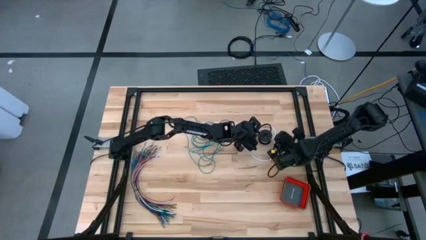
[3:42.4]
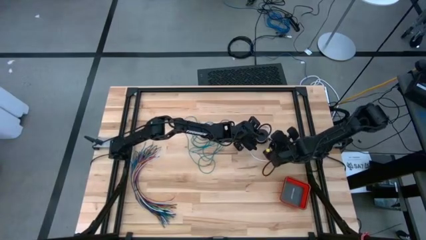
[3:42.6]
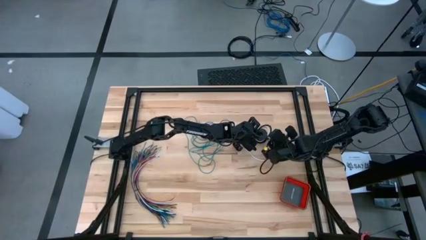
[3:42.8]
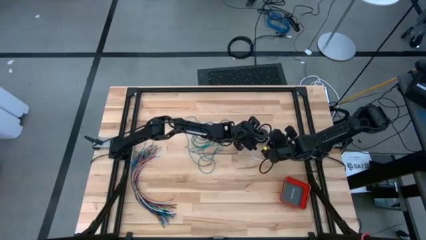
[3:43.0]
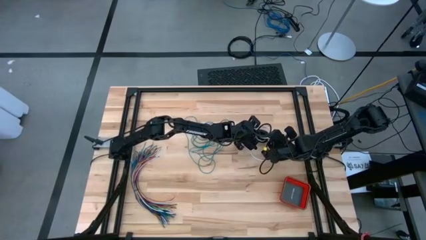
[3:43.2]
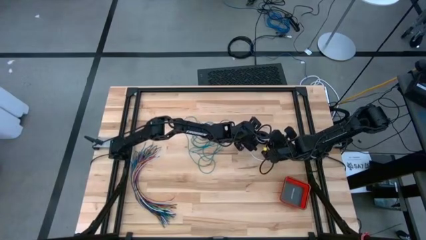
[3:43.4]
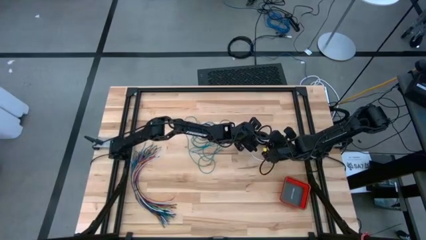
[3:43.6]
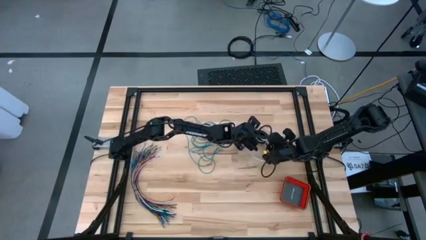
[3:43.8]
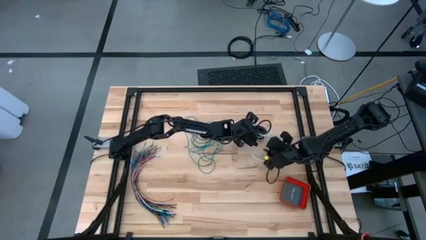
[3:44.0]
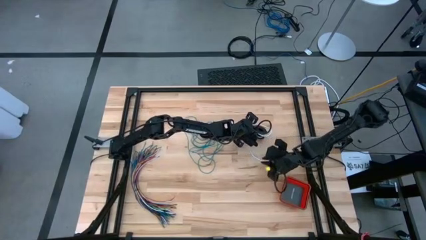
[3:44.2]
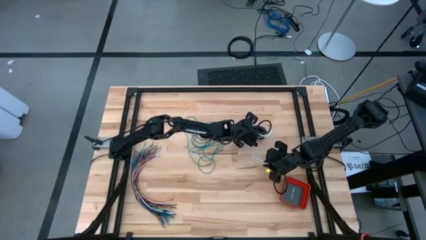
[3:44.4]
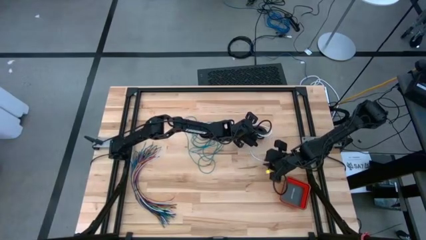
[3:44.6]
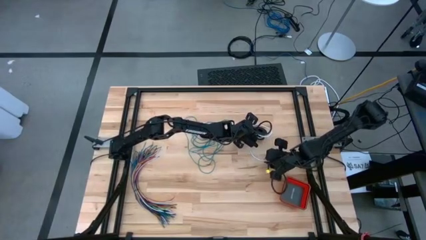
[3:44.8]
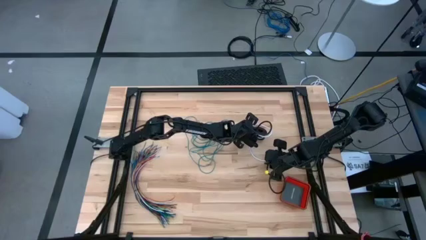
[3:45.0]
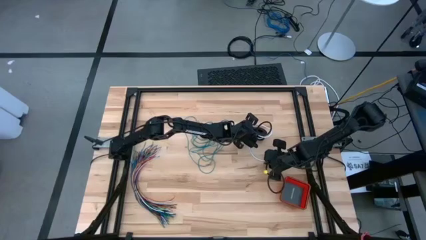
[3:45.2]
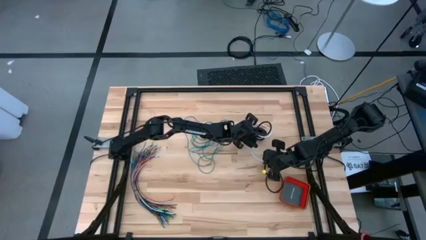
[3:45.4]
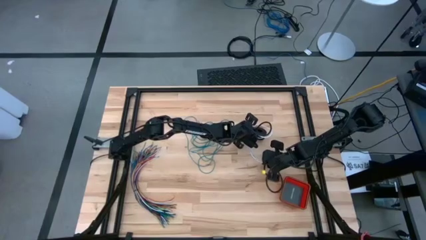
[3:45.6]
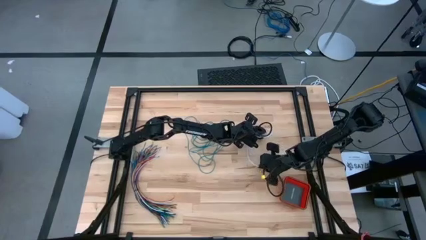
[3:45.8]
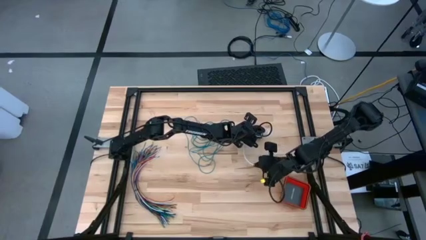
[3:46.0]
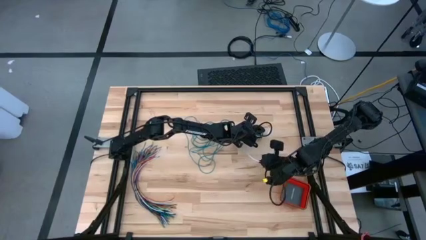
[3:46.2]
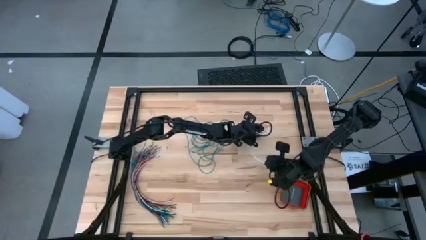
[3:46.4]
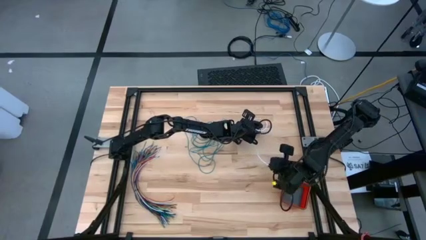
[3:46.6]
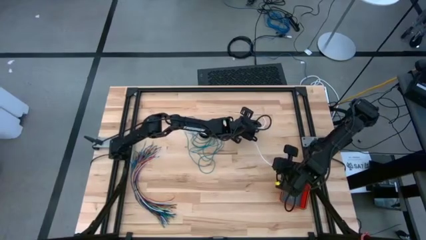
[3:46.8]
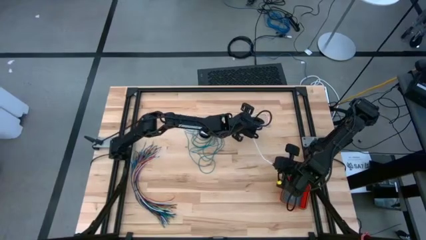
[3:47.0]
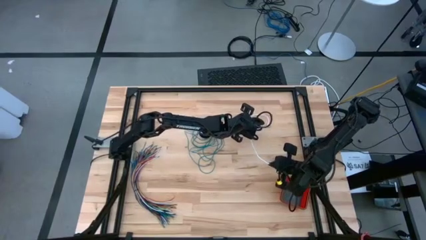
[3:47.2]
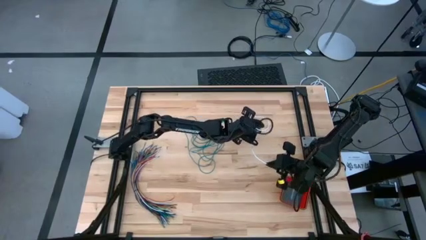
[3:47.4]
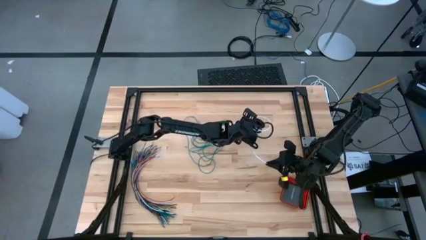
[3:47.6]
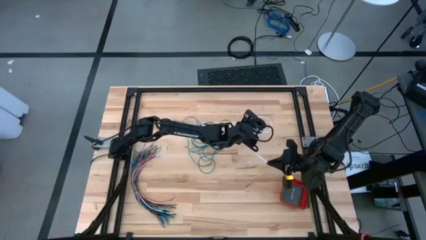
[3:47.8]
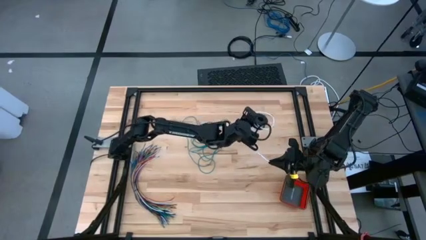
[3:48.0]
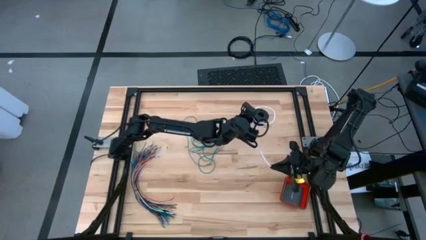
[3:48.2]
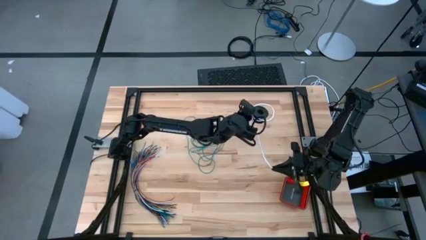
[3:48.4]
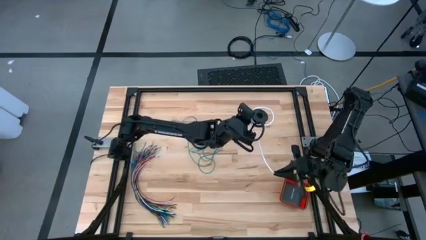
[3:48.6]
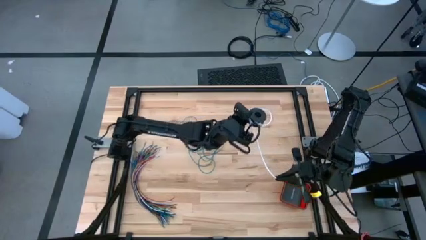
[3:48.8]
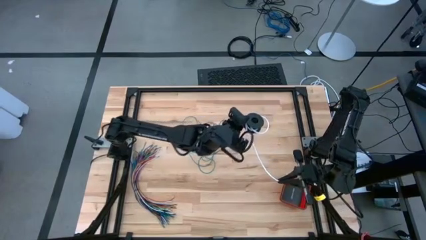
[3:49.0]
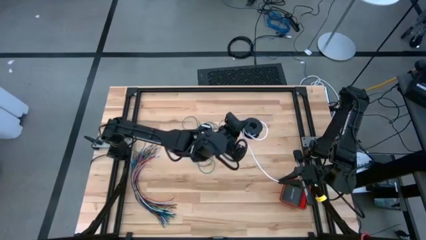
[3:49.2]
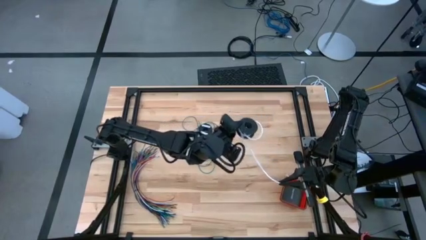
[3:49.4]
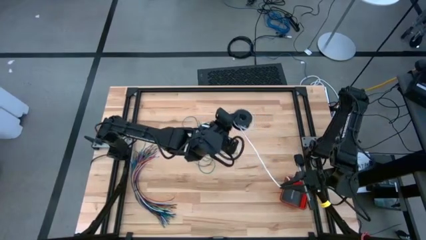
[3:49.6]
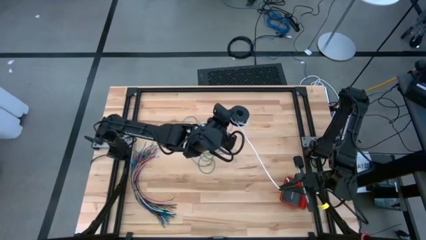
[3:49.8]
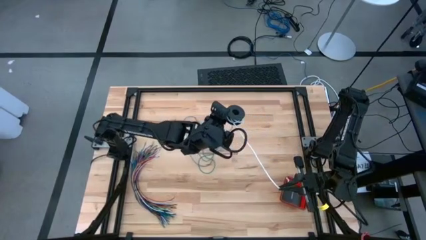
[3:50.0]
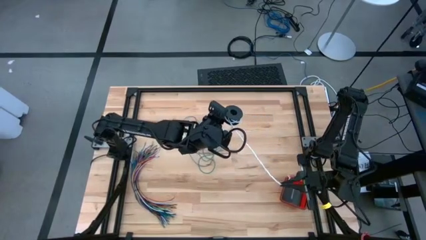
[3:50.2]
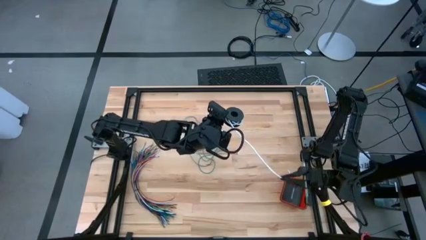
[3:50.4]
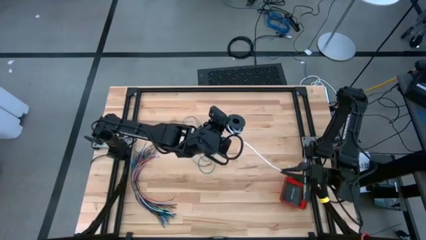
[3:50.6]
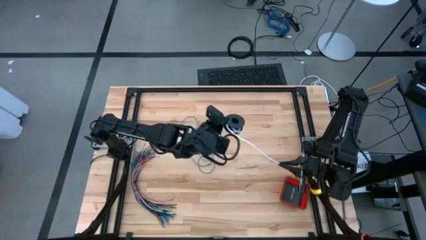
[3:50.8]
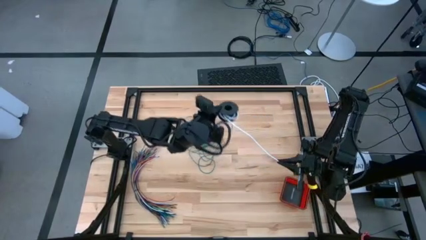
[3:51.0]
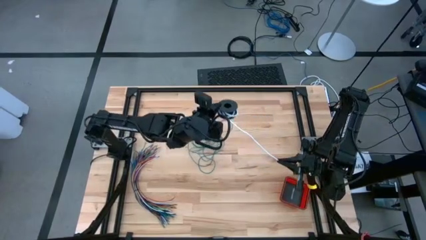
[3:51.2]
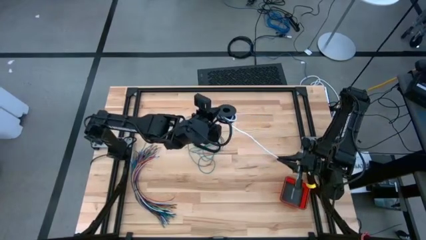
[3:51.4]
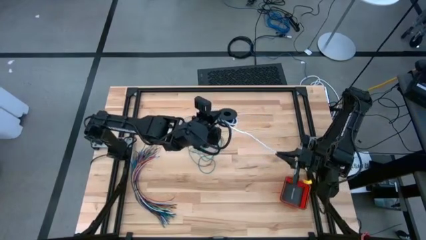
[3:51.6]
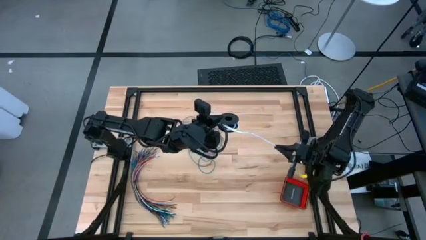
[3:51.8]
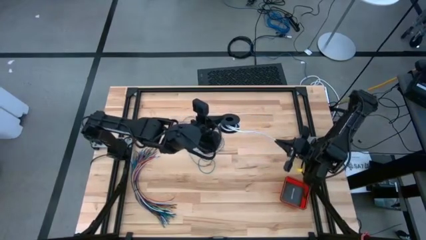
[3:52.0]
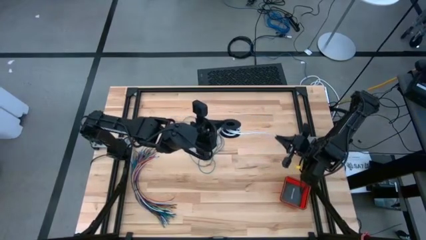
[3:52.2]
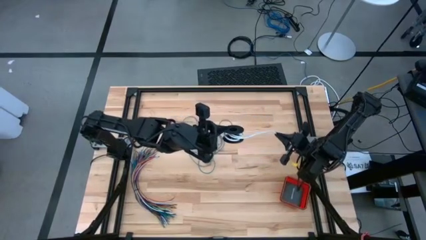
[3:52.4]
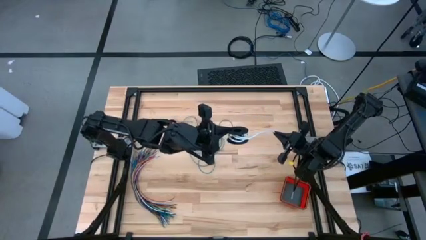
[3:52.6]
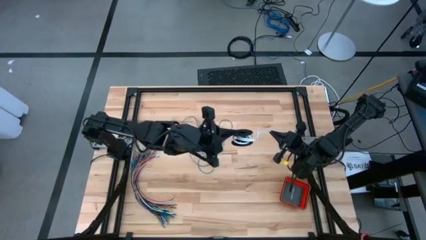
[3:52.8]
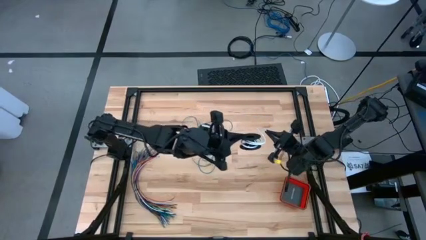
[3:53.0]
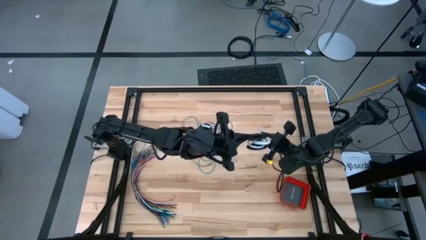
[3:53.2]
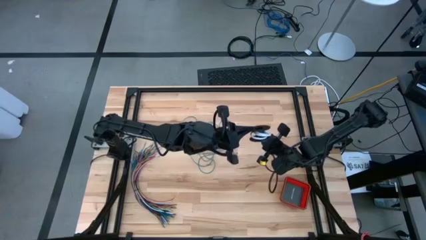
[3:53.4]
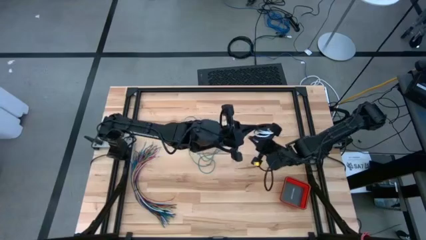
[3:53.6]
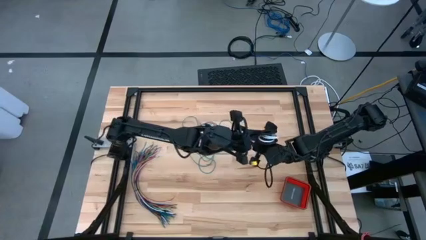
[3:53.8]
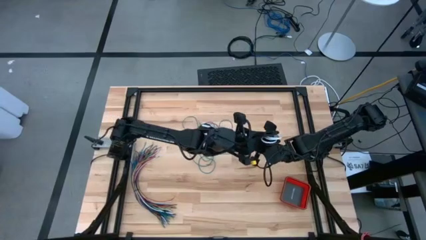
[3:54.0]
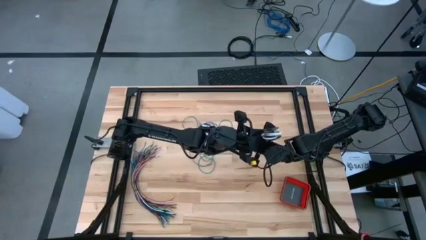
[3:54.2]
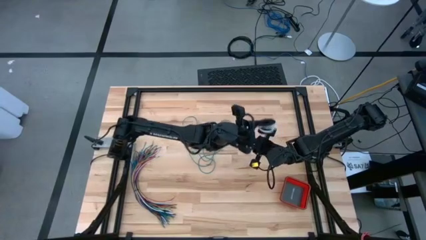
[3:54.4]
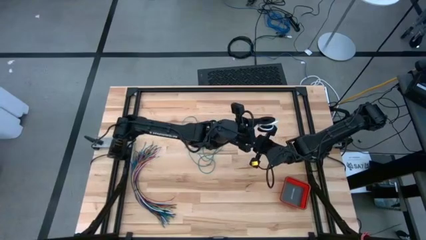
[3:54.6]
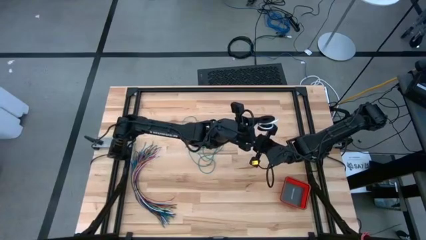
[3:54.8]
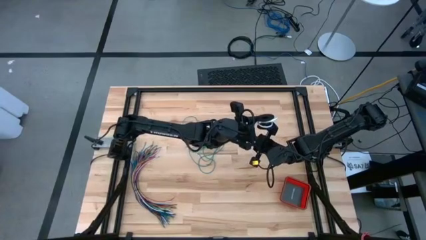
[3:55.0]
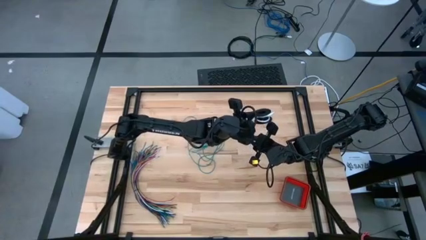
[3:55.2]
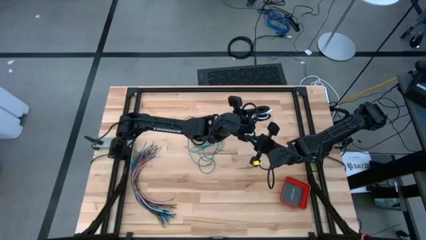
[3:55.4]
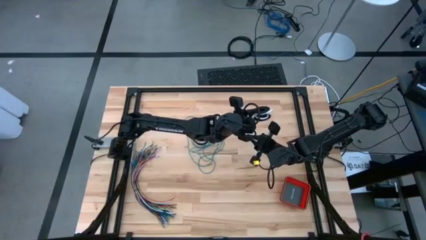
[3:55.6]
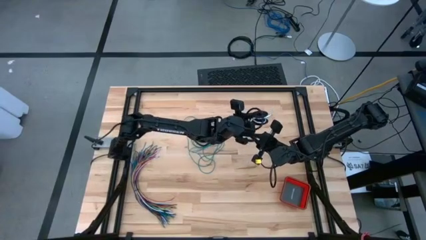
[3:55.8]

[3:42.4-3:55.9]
Task: Coil cords
Coil the white wire onto the spool

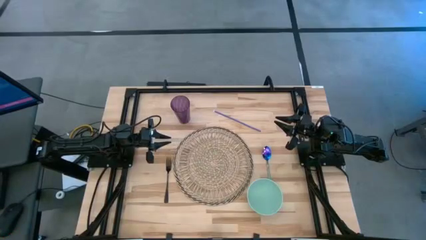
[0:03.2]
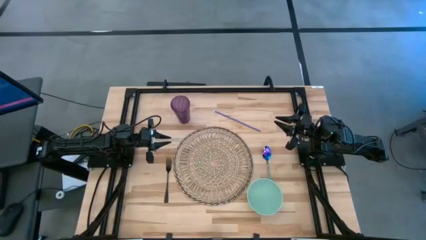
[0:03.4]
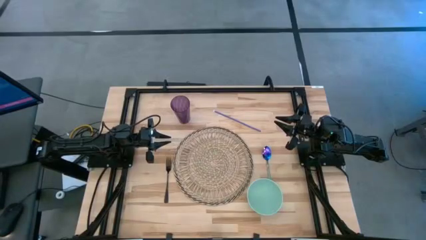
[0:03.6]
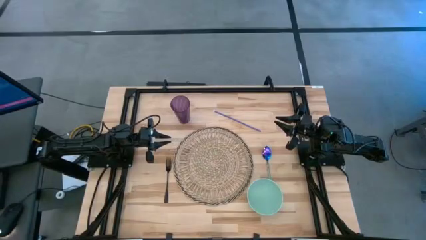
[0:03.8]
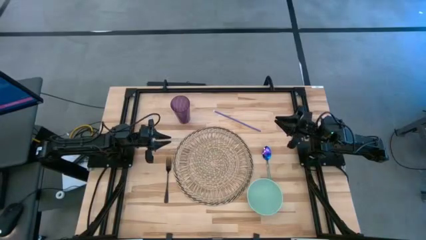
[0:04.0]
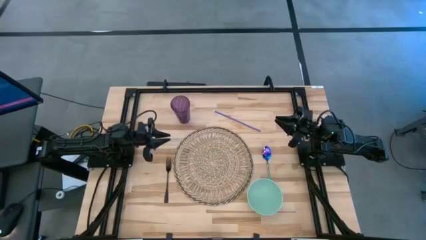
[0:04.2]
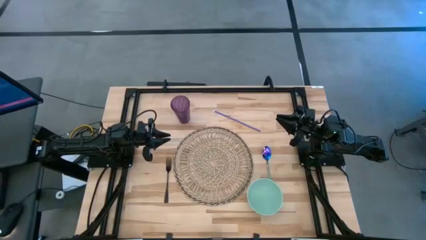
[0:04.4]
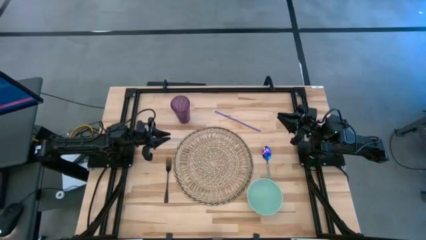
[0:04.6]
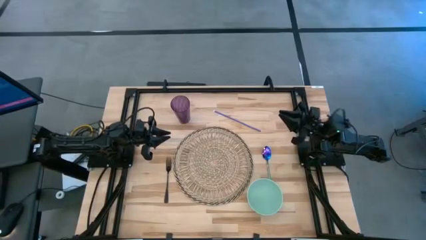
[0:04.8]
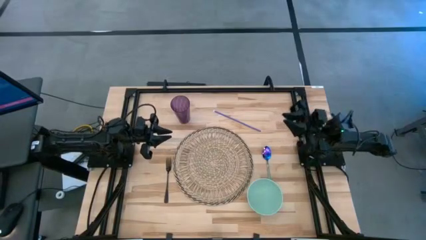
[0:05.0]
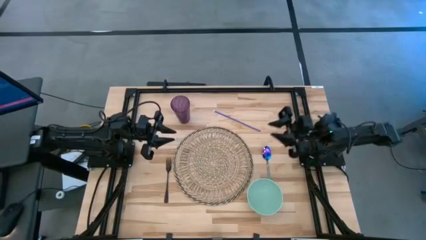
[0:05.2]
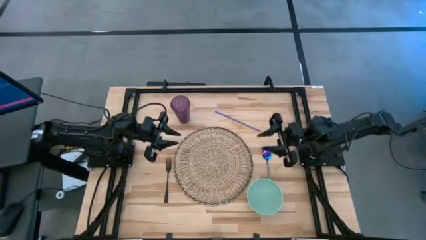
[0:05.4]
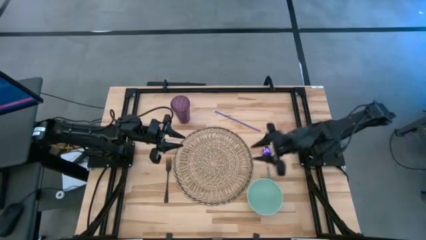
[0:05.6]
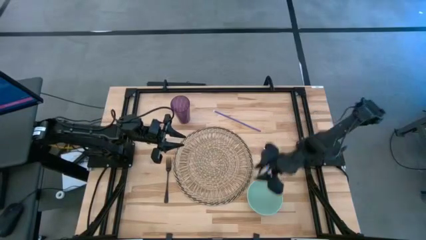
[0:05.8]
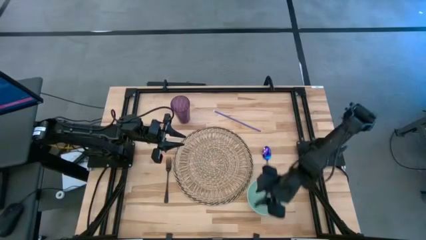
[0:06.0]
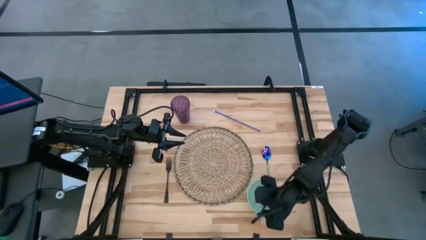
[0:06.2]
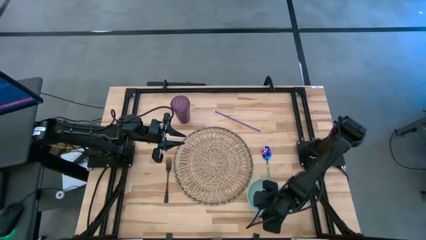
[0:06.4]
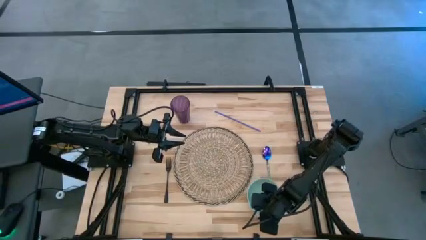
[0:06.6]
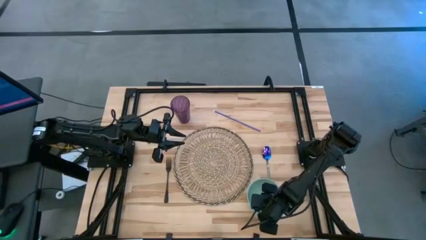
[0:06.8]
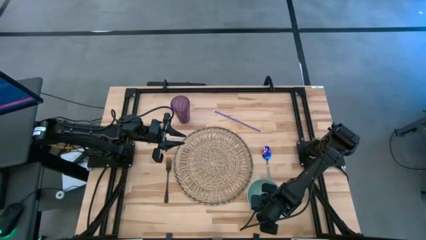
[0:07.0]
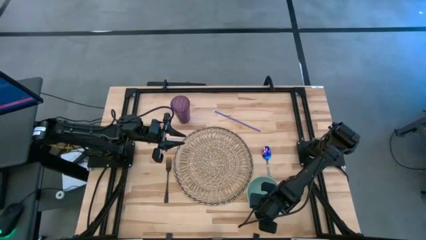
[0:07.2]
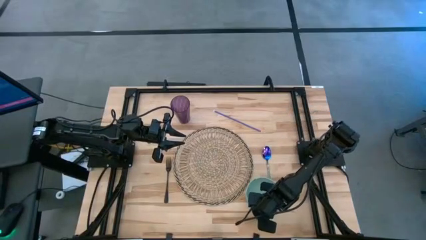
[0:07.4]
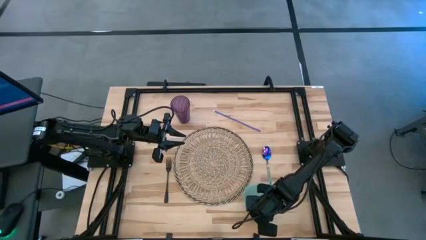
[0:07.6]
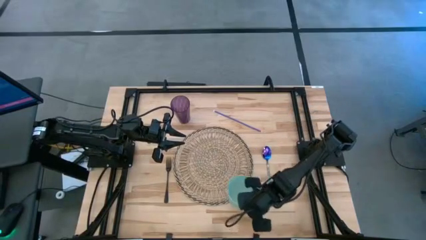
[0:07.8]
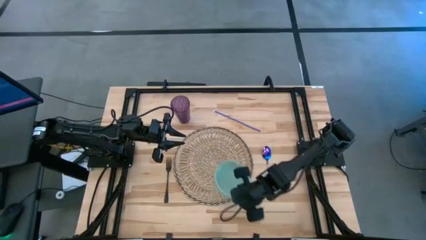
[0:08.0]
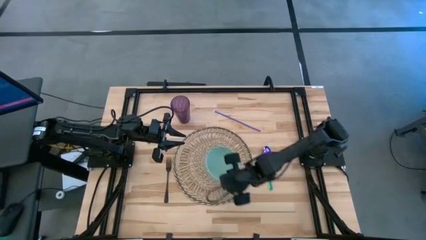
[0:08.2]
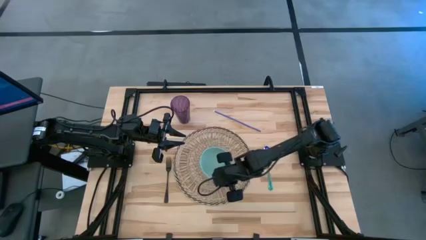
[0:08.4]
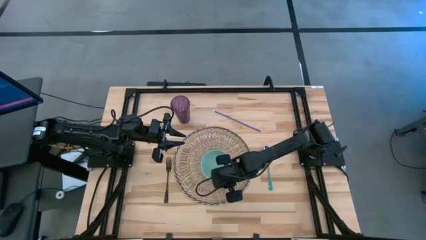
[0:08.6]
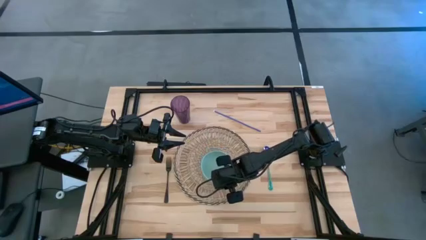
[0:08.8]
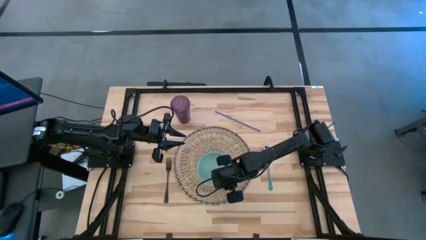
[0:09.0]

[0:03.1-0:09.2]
Task: Pick & Place Utensil
Put the blue bowl on the brown mat
